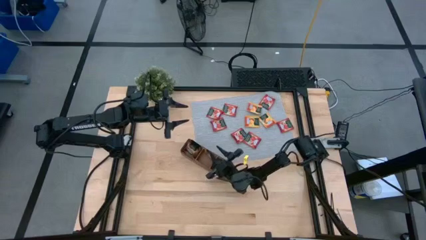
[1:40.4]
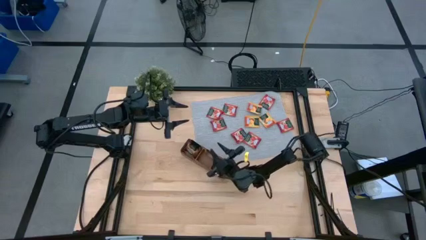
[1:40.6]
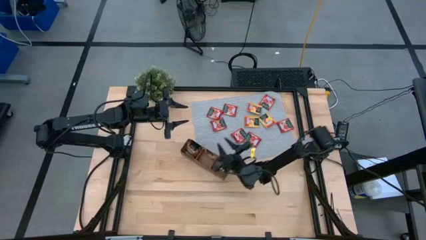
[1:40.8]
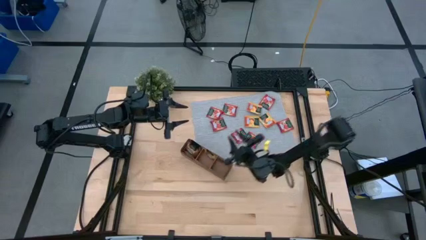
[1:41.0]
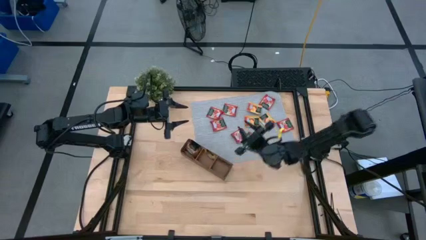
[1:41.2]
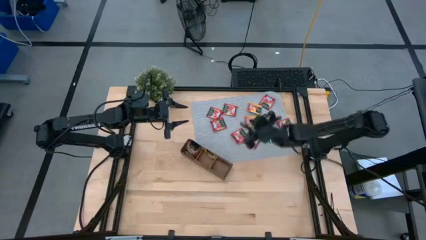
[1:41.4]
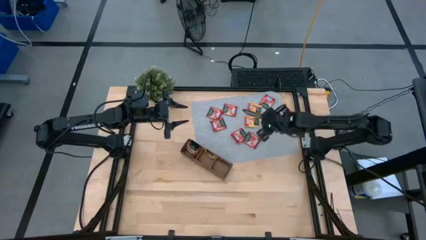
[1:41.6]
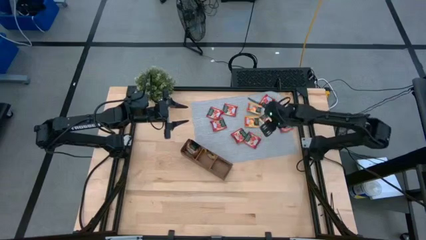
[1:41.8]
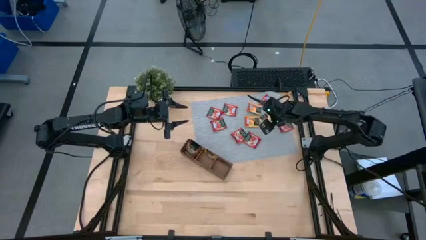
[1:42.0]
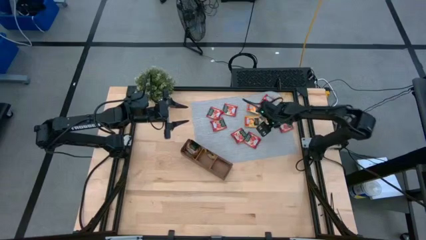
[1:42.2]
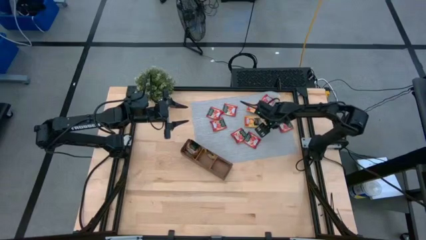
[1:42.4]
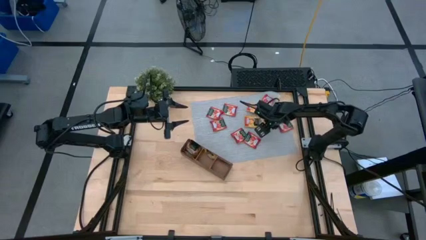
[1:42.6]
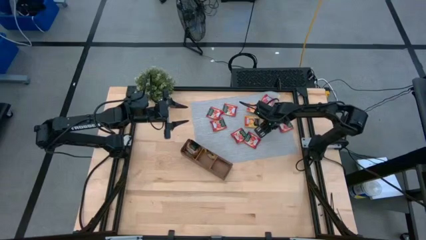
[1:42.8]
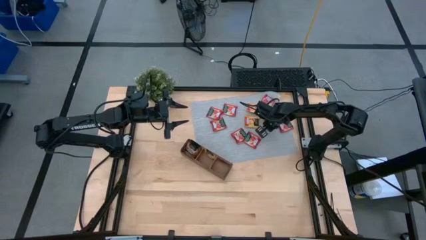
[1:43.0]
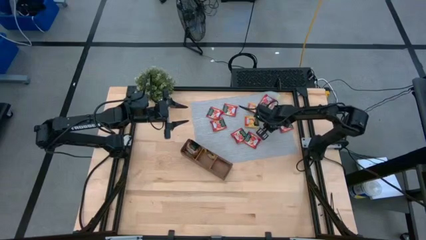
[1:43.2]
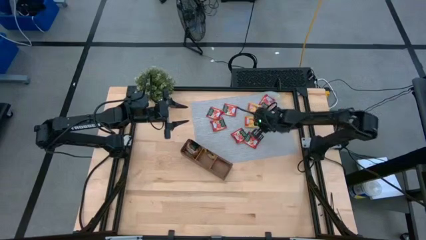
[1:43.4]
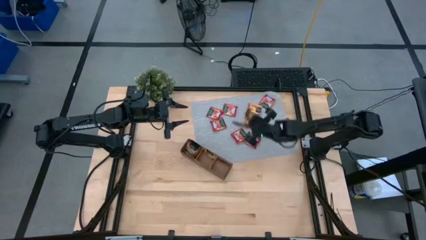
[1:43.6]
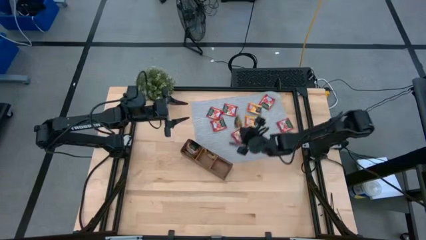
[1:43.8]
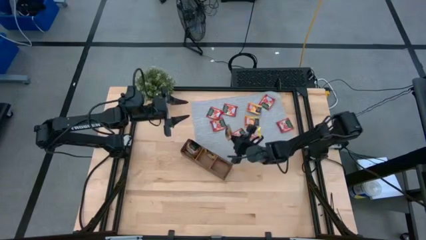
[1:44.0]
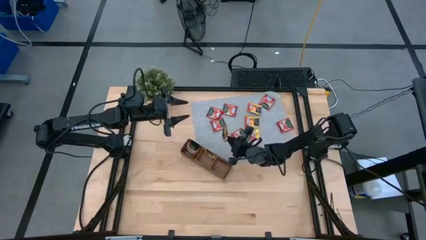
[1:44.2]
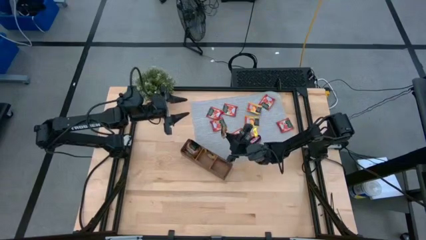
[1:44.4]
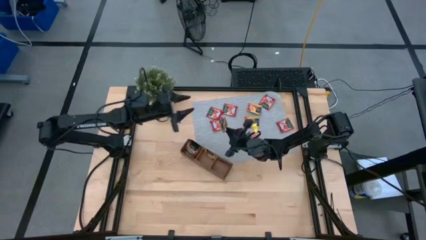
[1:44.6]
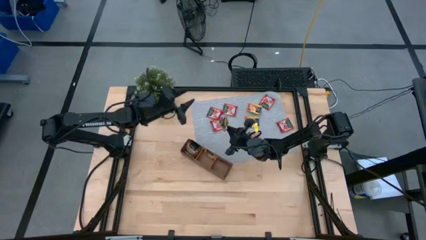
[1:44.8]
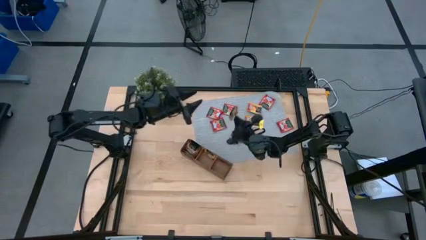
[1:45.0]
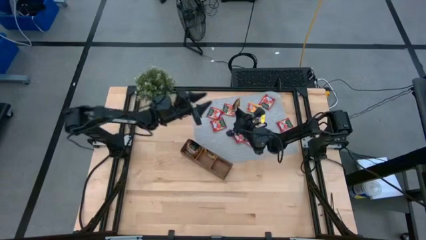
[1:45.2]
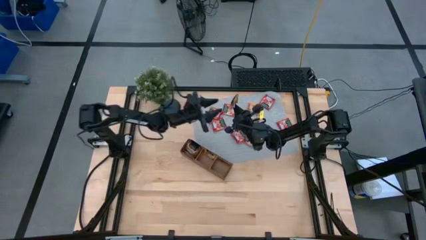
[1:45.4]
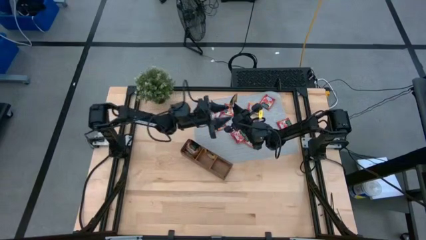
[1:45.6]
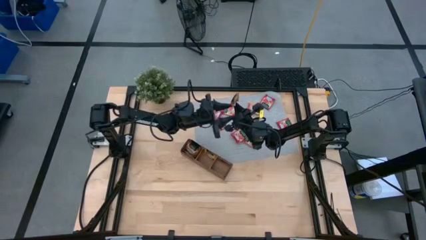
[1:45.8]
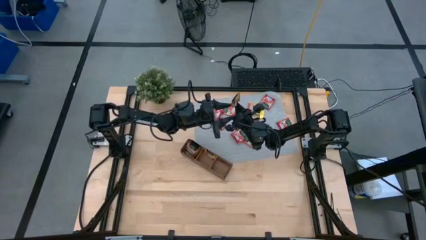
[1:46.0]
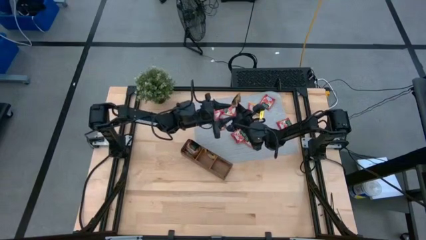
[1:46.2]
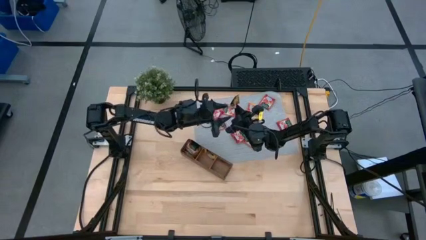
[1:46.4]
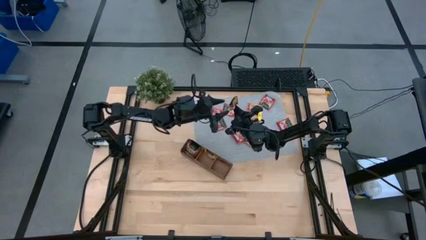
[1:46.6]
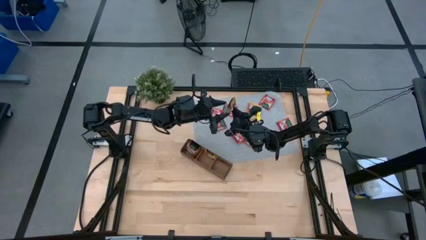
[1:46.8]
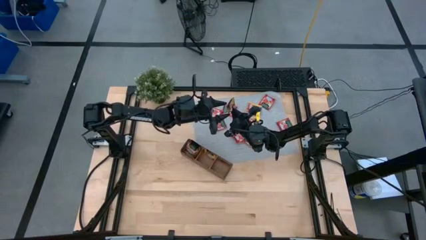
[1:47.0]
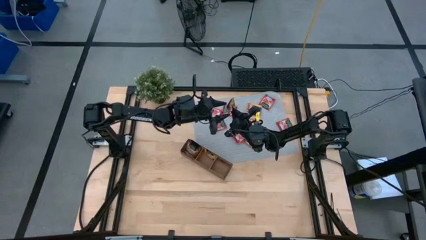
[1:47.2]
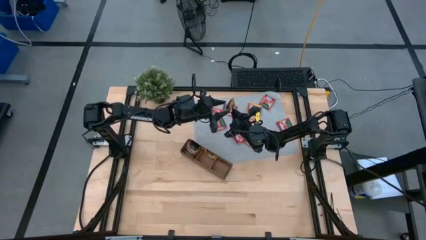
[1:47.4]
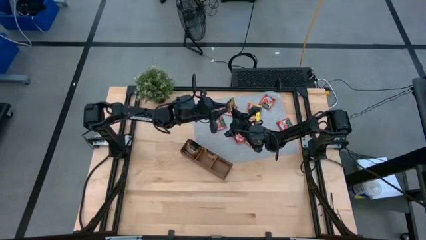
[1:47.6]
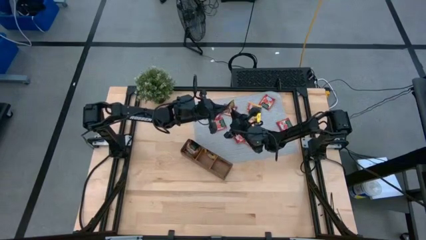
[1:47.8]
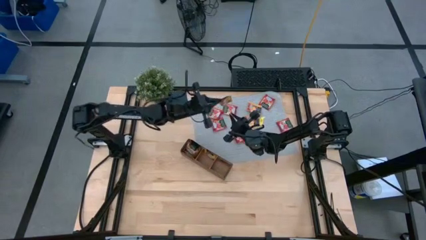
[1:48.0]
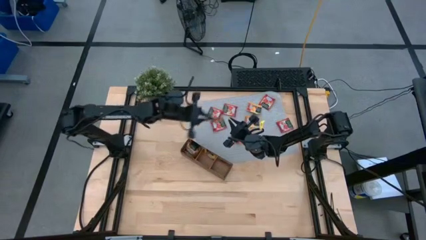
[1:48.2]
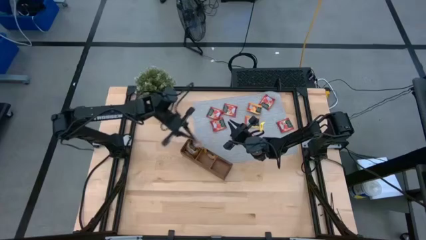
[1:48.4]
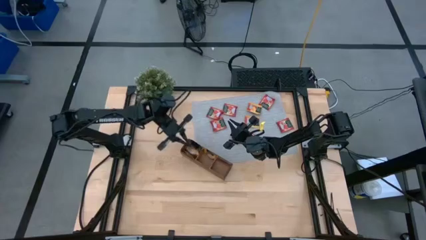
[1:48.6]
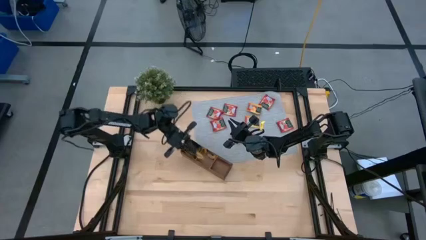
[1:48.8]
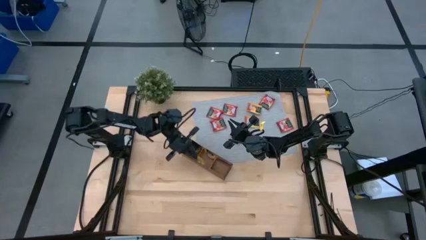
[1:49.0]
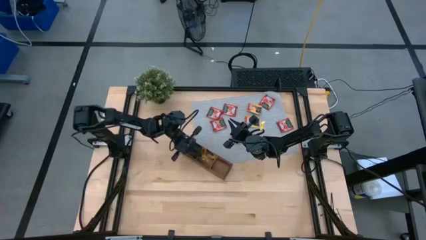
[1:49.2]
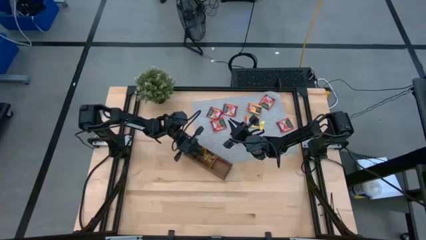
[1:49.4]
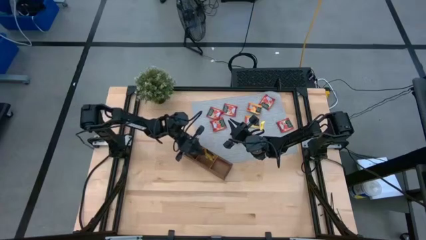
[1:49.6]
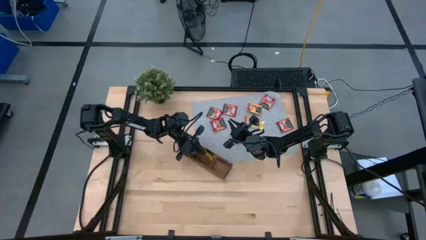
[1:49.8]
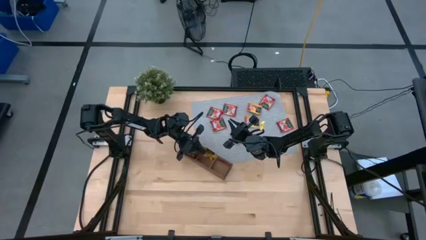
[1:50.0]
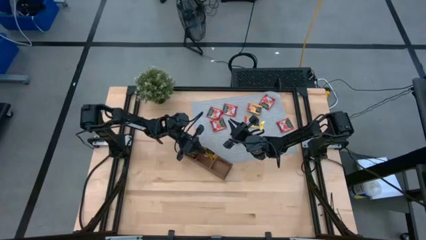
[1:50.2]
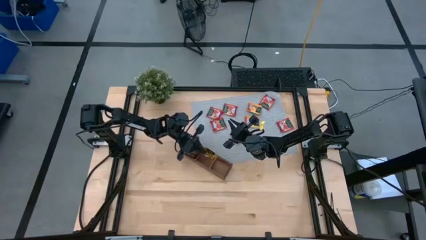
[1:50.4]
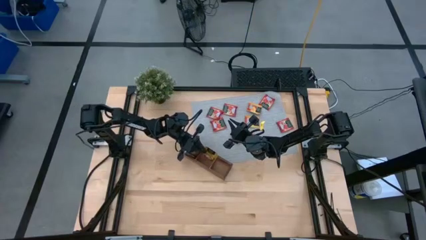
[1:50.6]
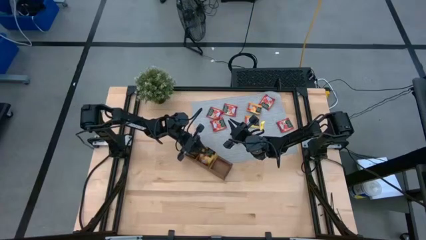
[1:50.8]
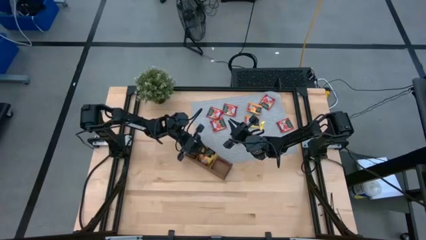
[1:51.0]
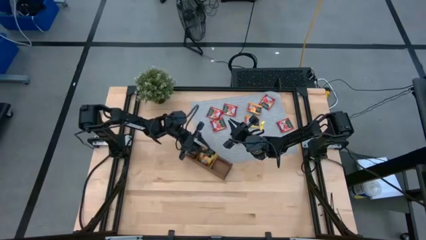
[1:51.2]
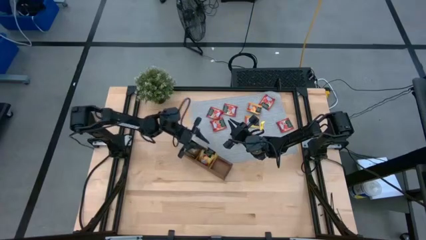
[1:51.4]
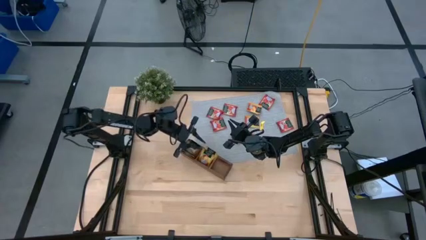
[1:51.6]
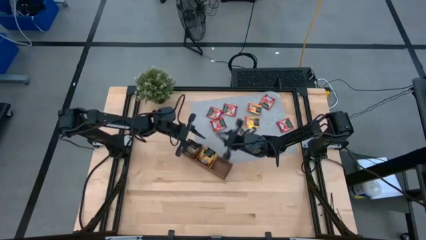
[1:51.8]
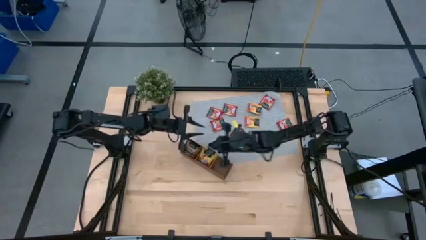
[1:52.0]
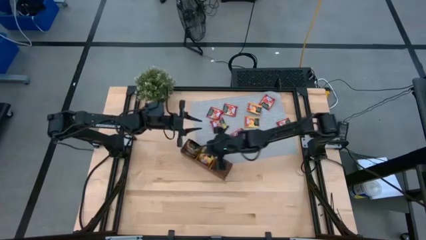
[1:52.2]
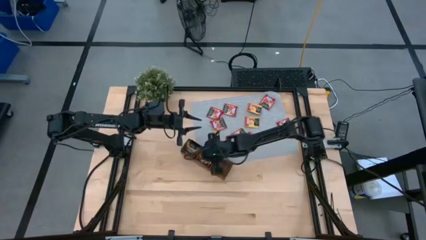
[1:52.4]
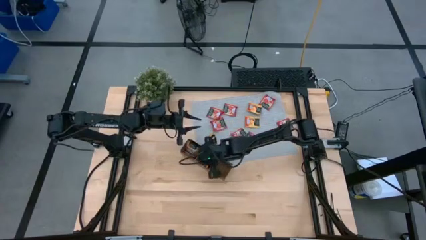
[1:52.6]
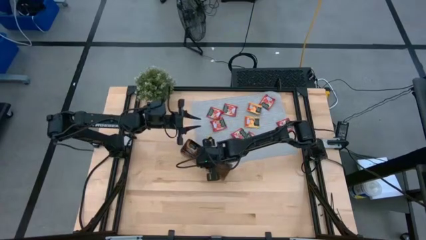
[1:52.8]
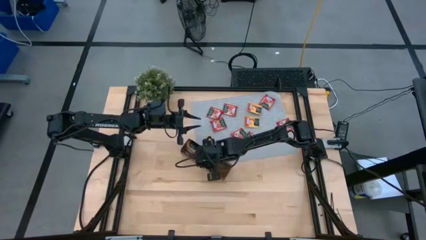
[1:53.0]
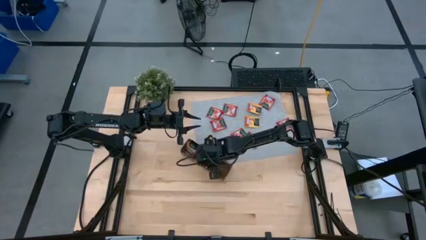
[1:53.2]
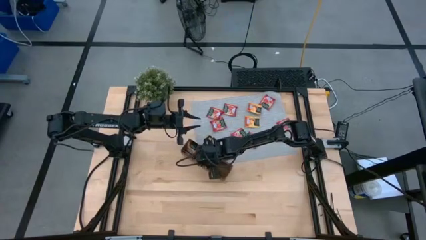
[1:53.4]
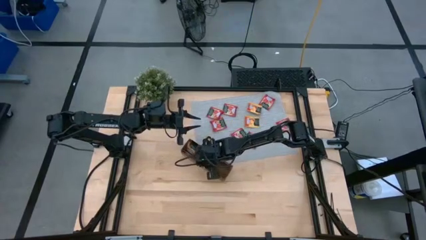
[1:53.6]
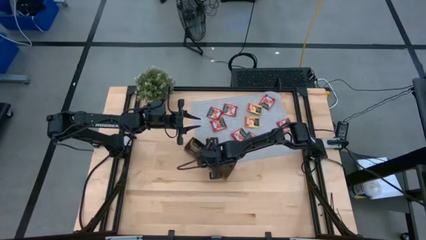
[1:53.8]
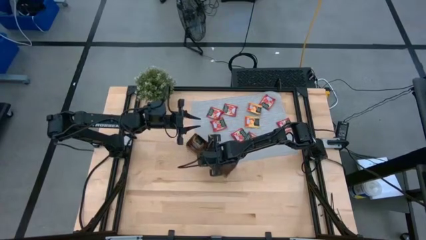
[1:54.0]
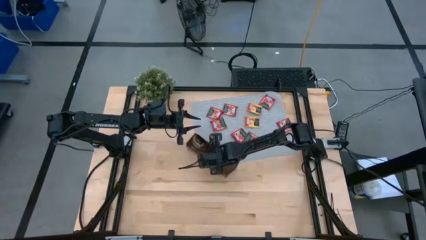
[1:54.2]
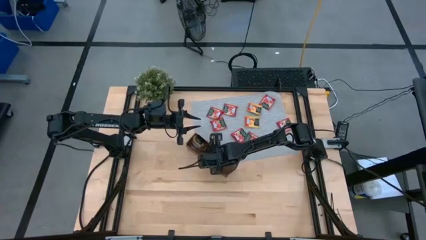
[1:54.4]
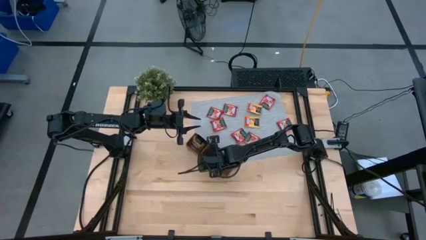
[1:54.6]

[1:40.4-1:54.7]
Task: Pick & Place Tea
Put the yellow tea bag into the middle section of the wooden organizer
